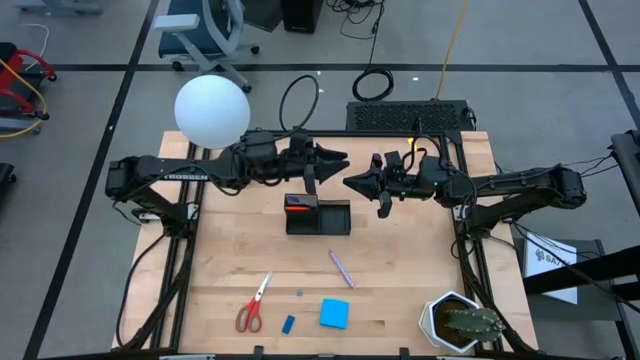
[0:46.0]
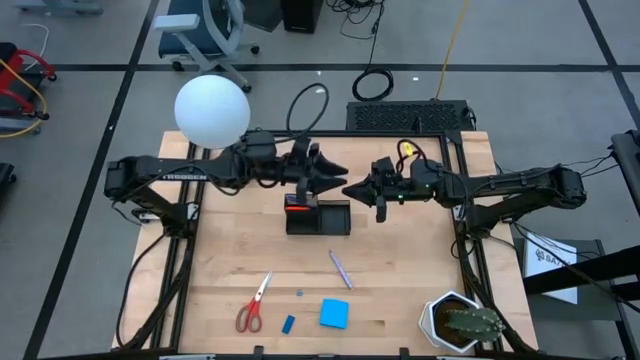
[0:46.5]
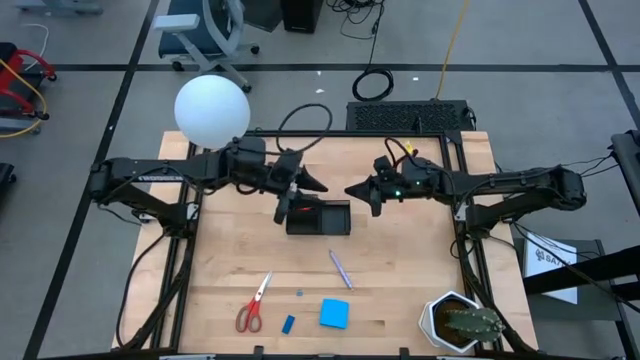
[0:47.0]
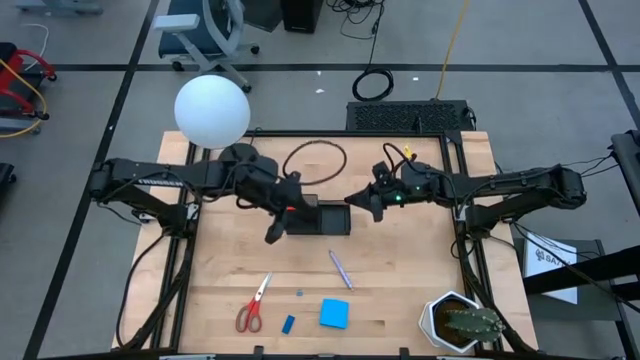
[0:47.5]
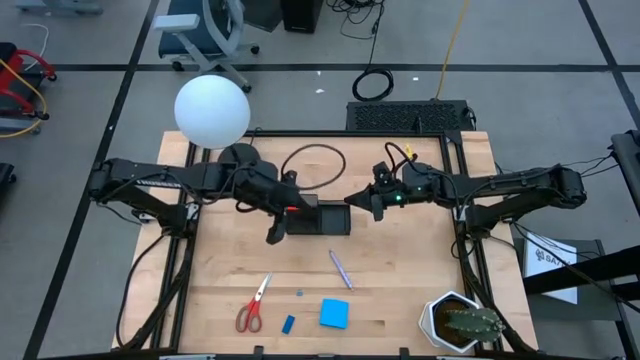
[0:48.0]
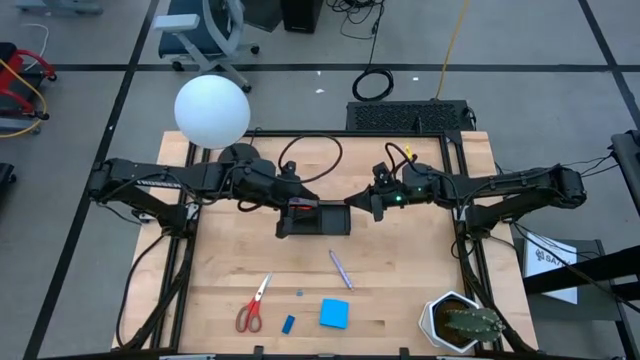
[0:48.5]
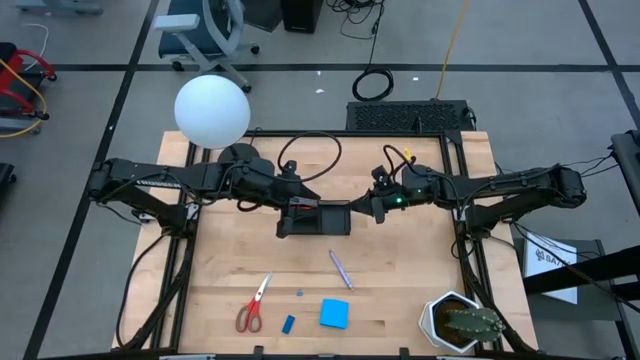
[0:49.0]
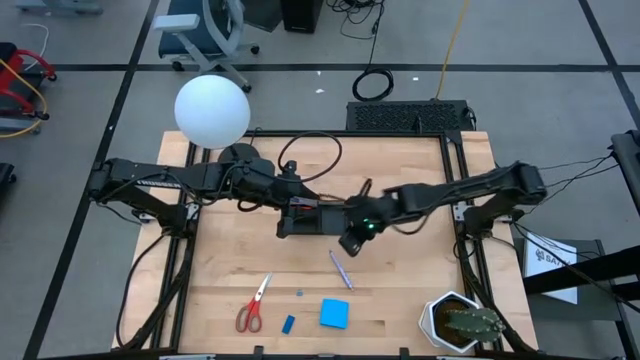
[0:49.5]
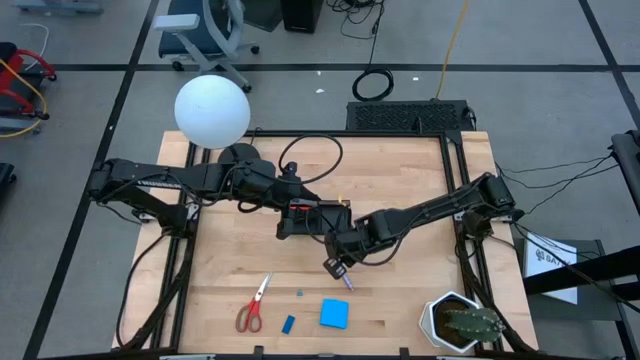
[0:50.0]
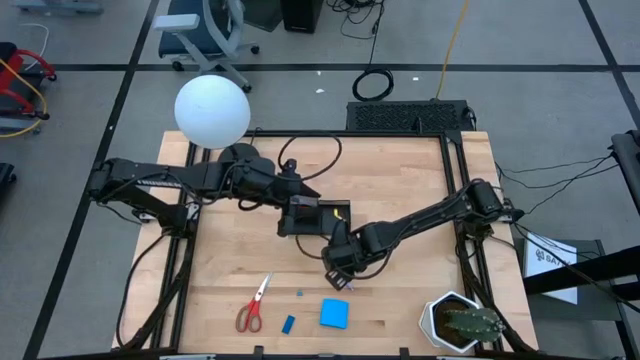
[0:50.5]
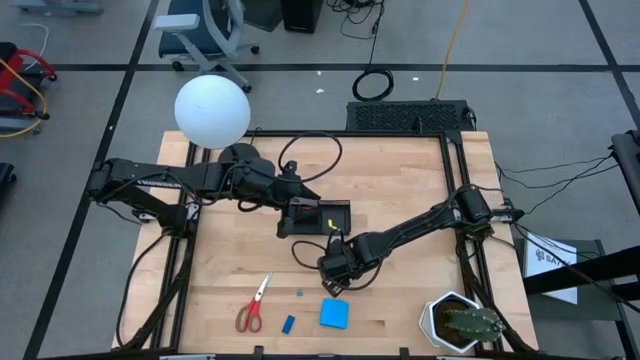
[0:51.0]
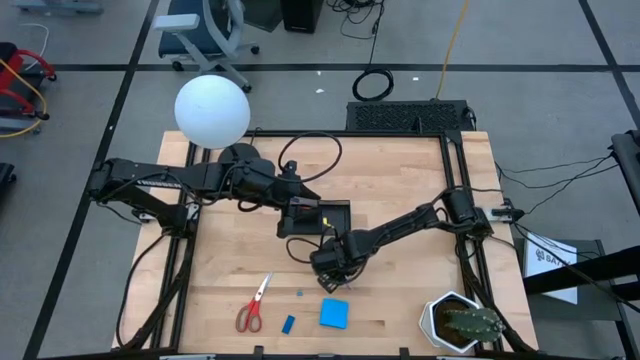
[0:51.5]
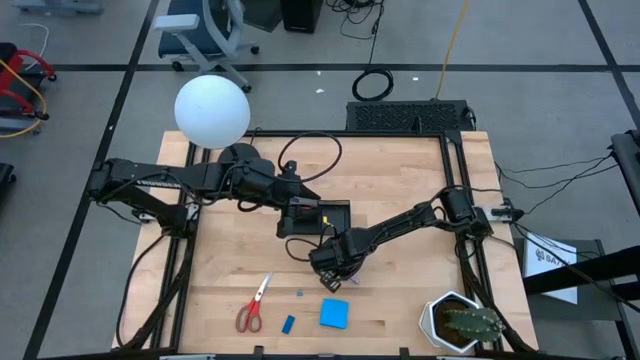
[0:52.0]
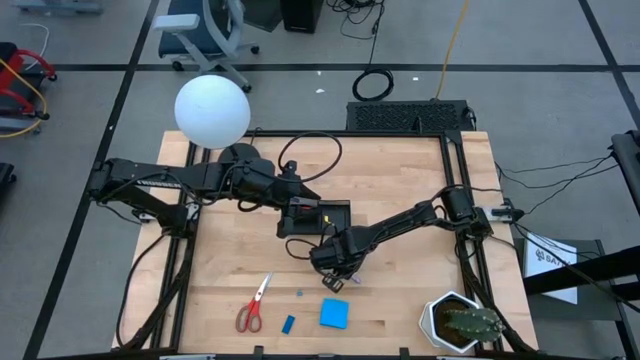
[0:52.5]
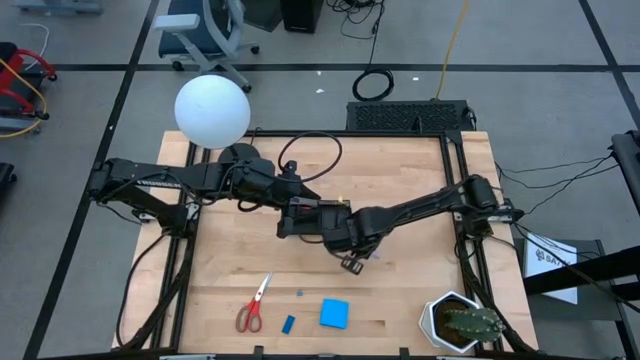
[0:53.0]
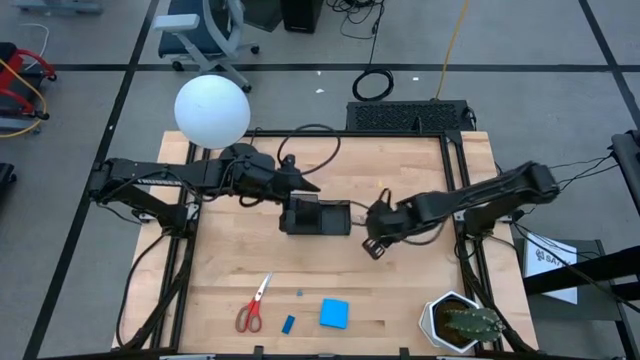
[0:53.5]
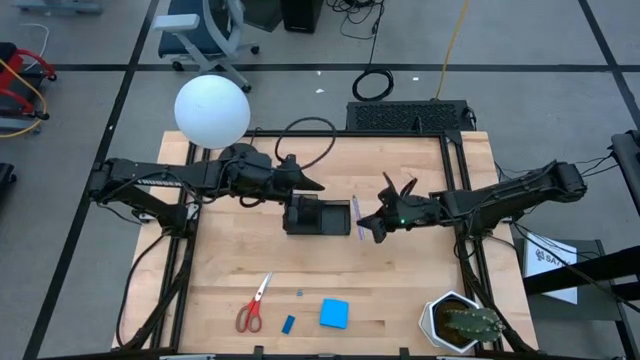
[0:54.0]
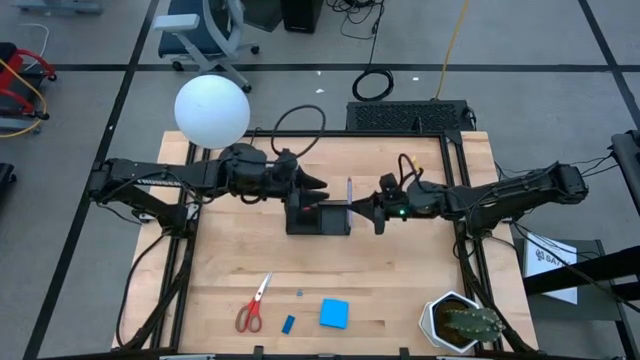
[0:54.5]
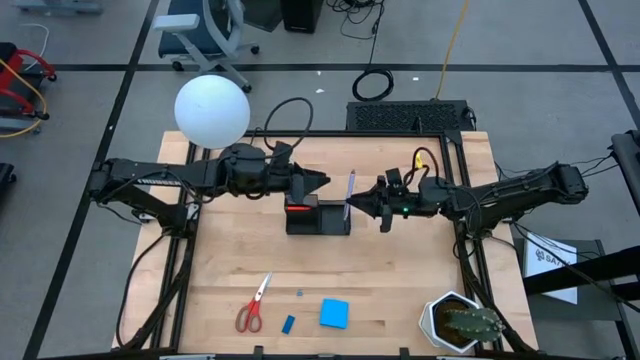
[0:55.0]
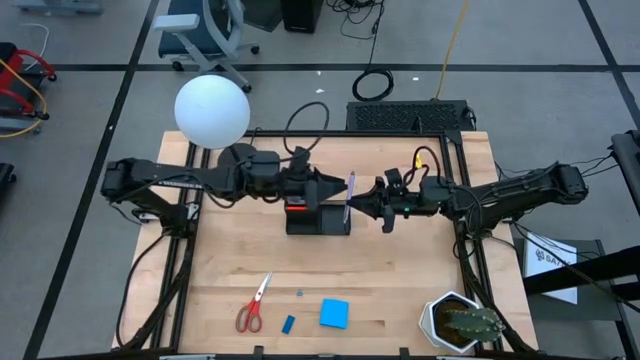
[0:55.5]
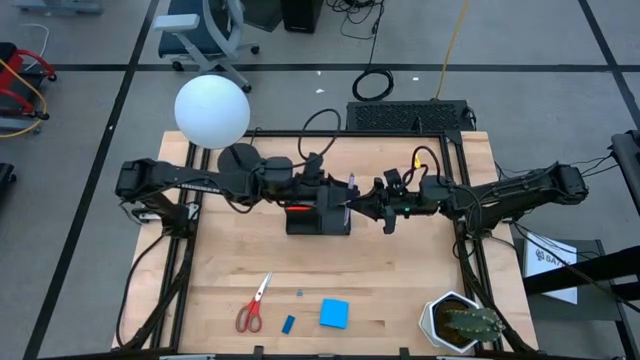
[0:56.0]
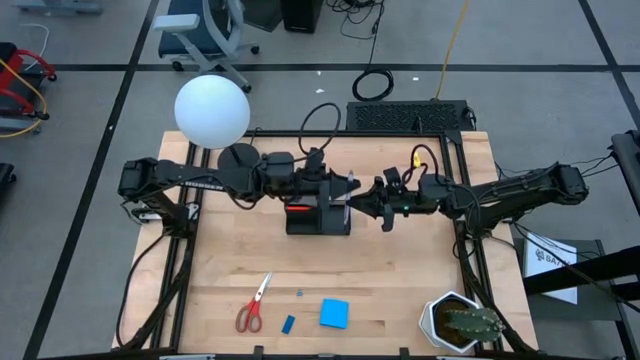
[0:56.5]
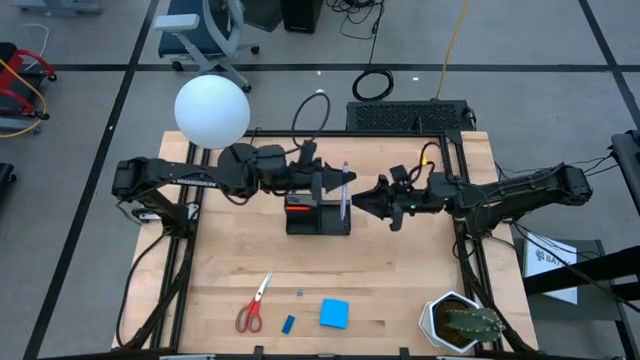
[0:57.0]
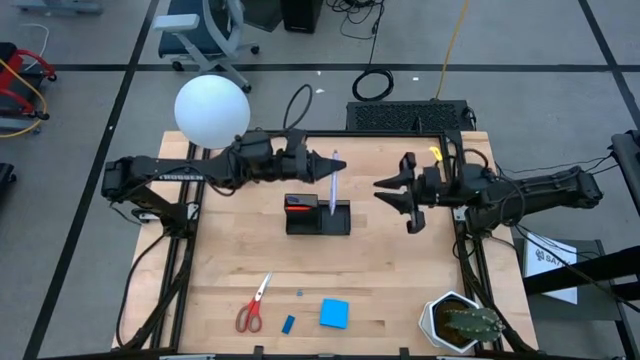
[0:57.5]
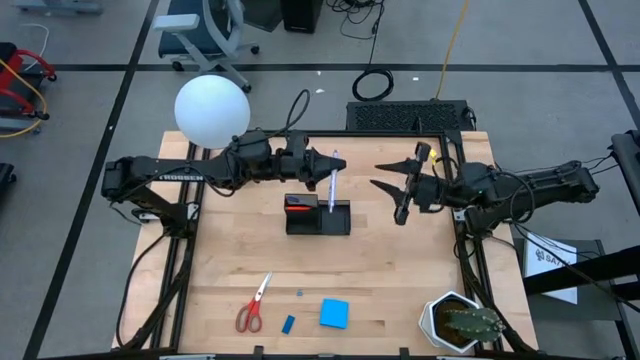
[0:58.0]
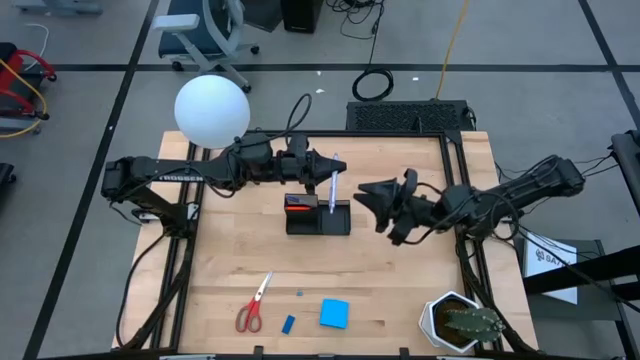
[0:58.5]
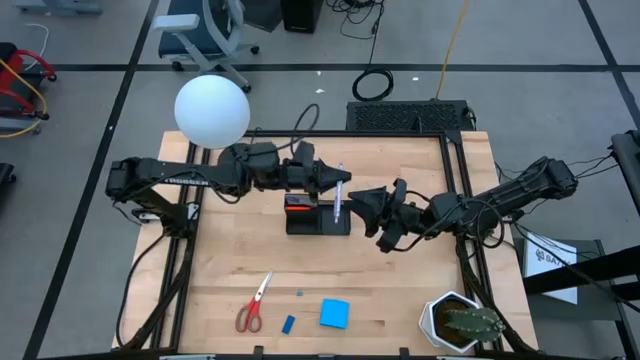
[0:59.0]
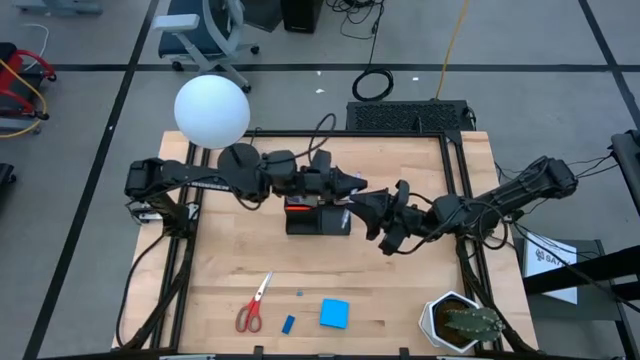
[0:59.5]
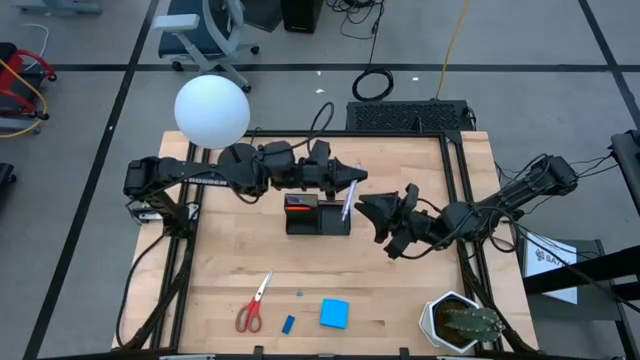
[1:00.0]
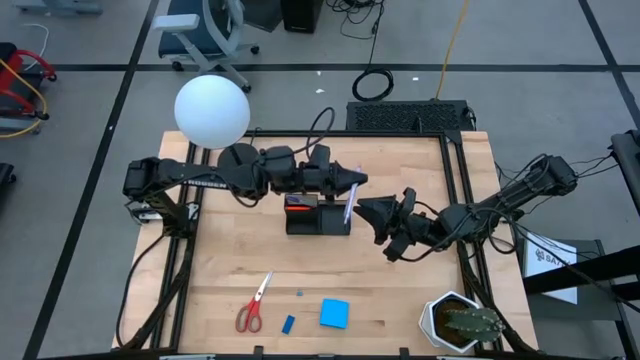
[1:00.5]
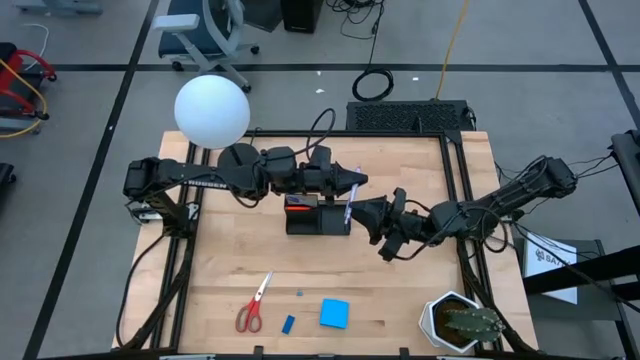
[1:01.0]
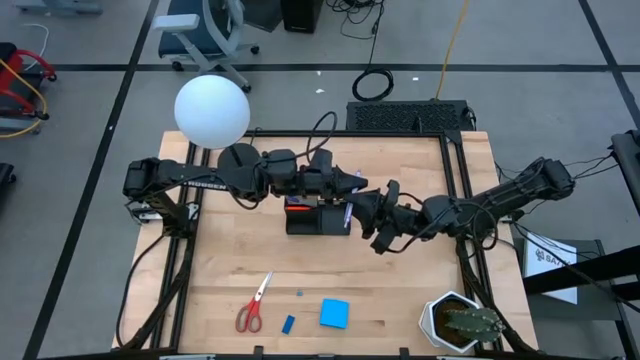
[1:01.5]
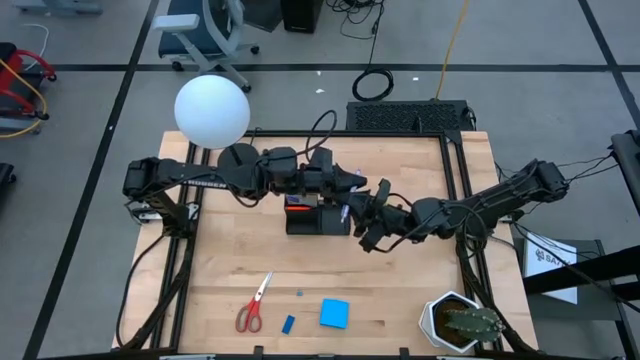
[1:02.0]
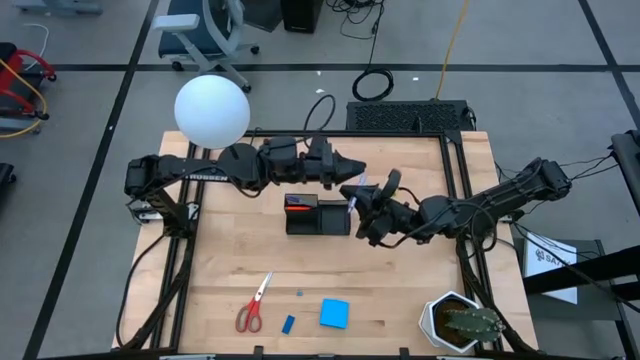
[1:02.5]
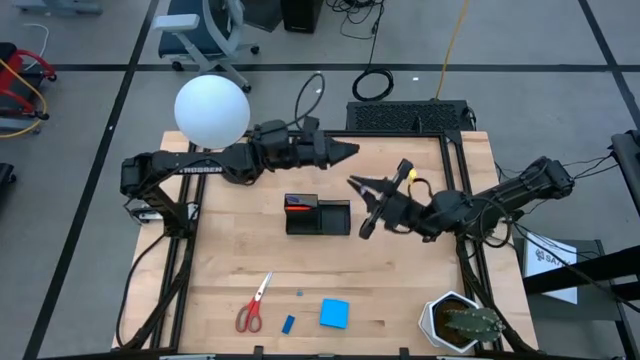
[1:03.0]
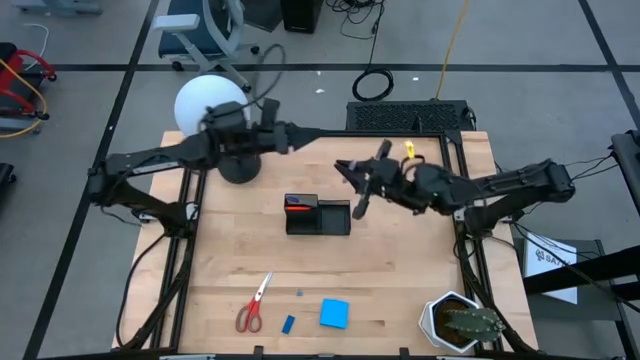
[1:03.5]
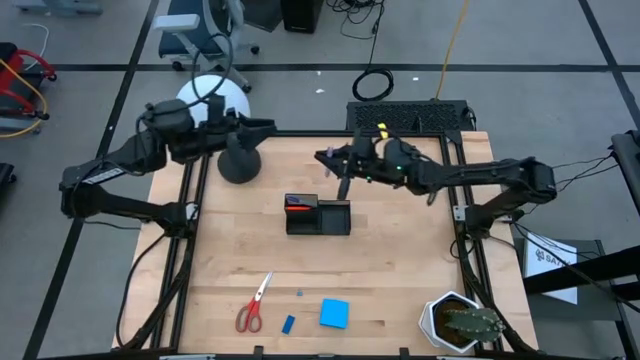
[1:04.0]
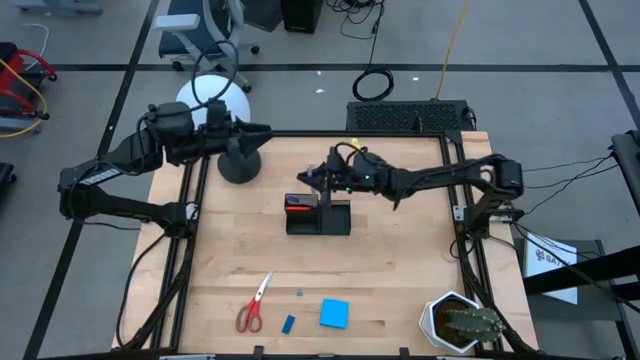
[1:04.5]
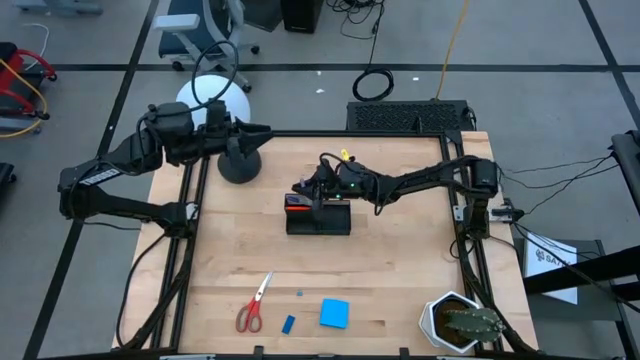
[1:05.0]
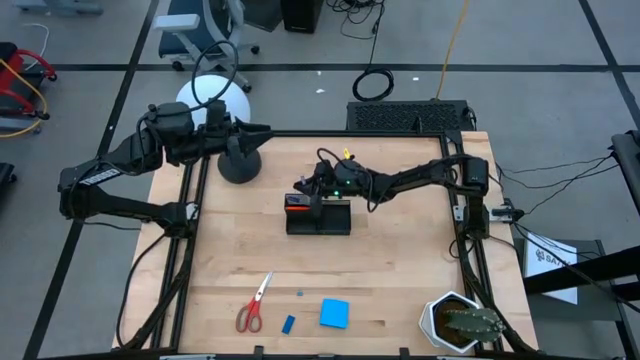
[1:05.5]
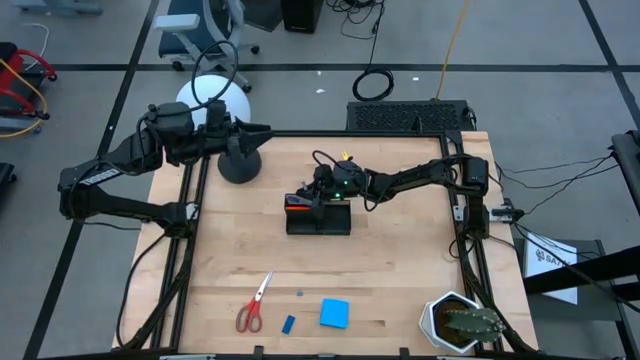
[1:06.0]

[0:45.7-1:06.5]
Task: Pick and place office supplies into organizer
Put the purple pen into the desk organizer

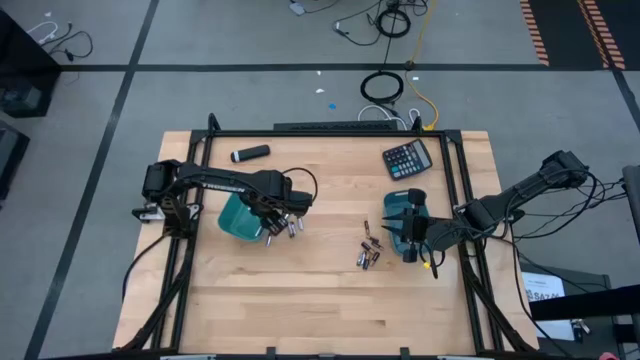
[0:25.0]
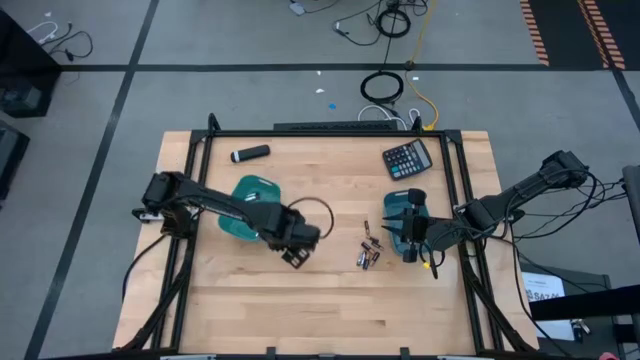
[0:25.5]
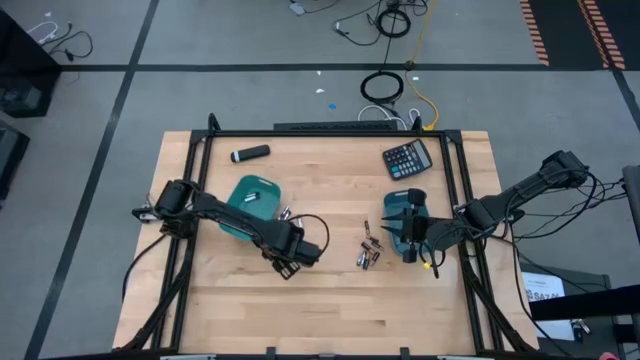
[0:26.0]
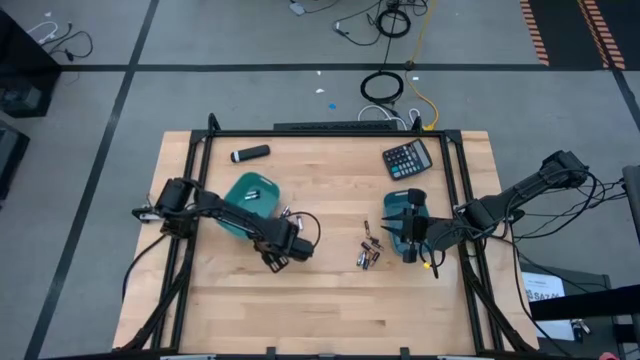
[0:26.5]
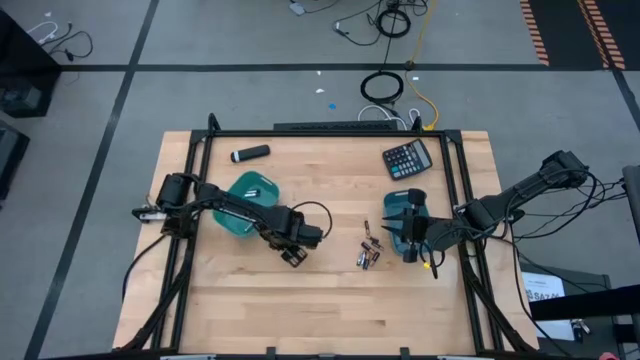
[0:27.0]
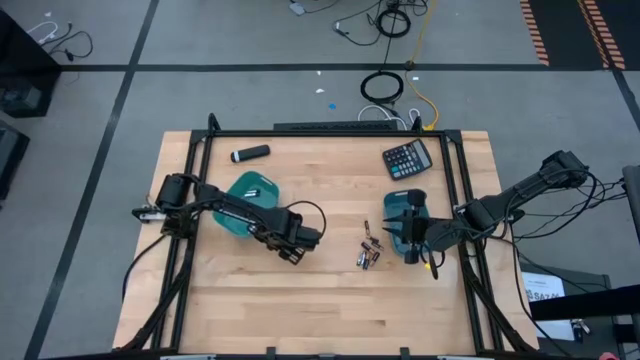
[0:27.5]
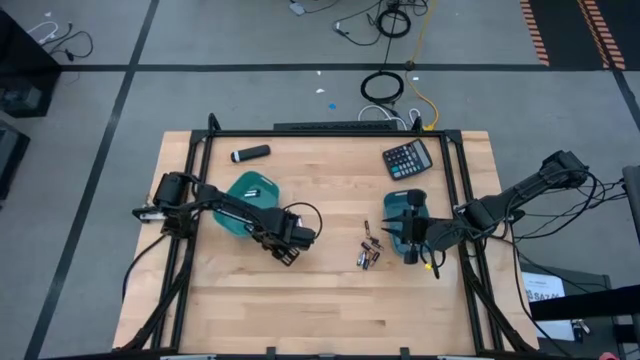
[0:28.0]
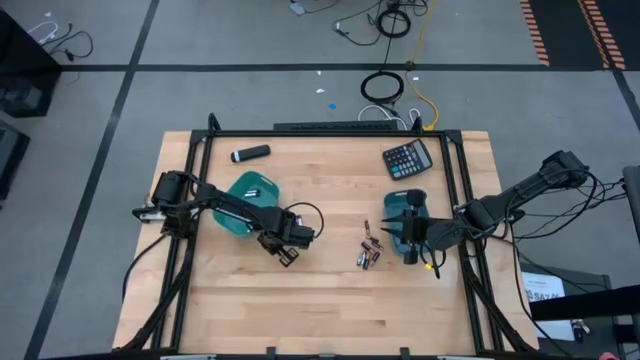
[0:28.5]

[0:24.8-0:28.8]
Task: Sort batteries
Put the silver battery into the green bin
